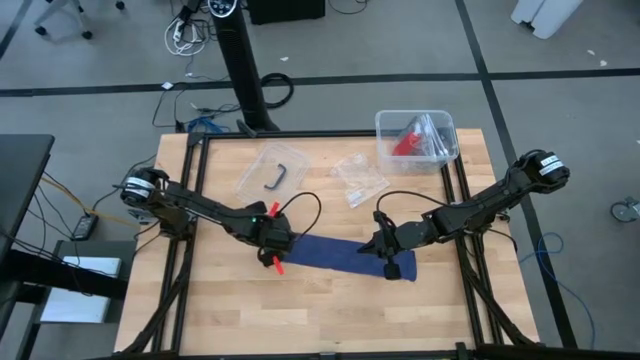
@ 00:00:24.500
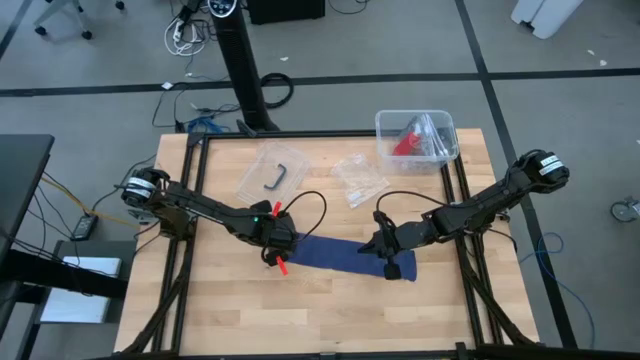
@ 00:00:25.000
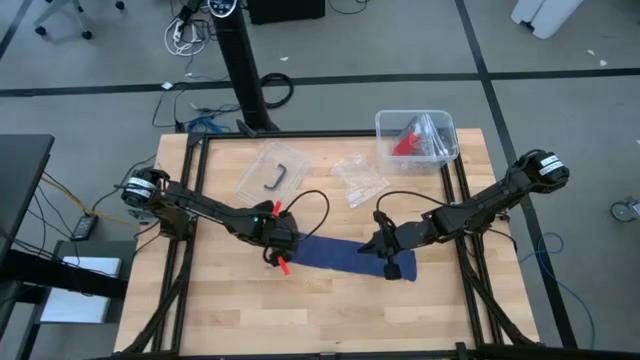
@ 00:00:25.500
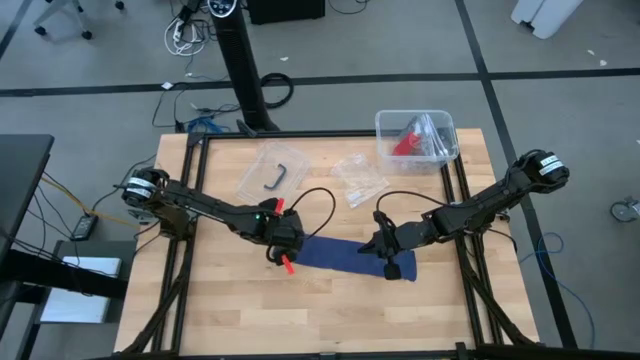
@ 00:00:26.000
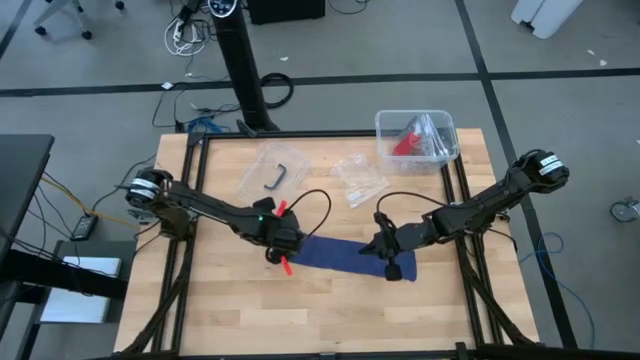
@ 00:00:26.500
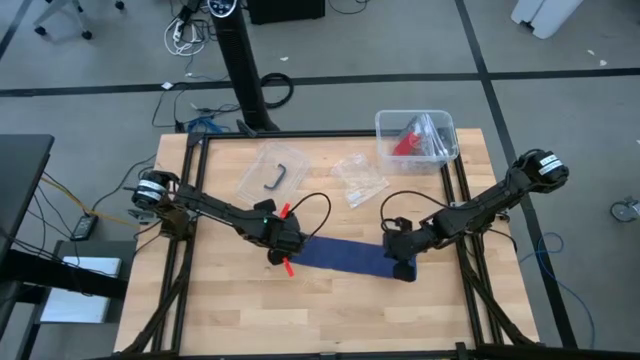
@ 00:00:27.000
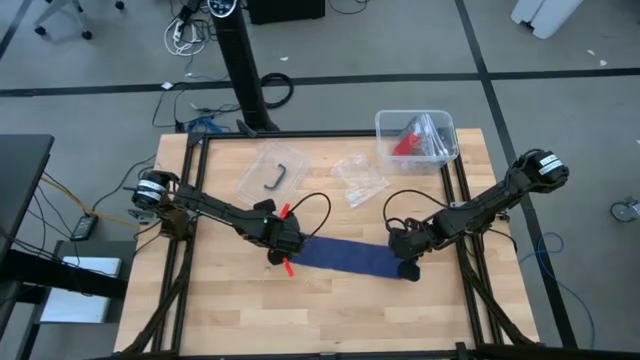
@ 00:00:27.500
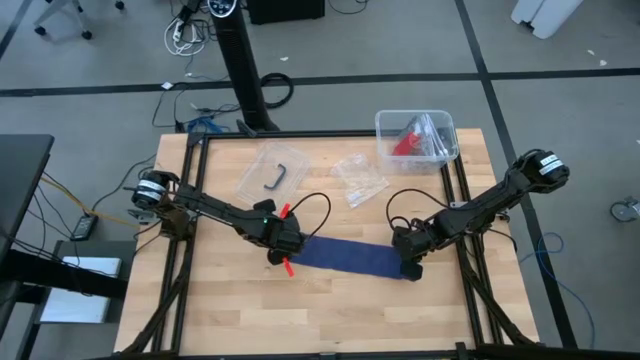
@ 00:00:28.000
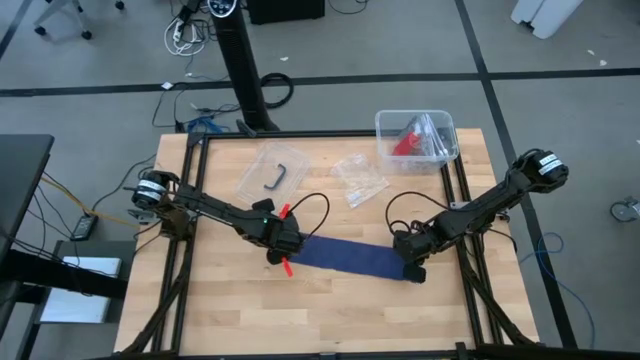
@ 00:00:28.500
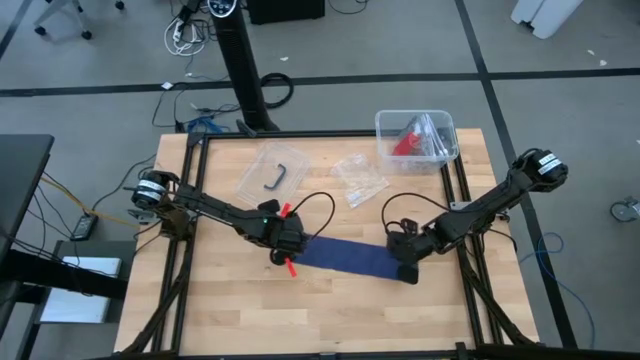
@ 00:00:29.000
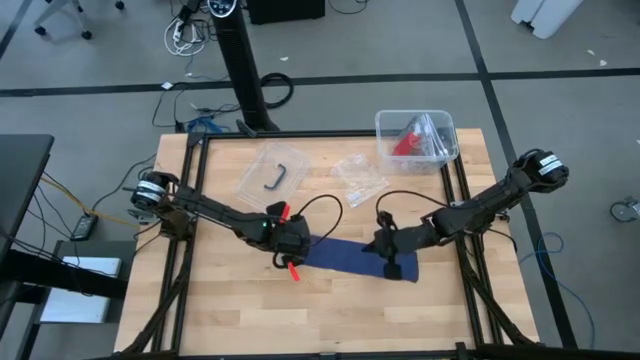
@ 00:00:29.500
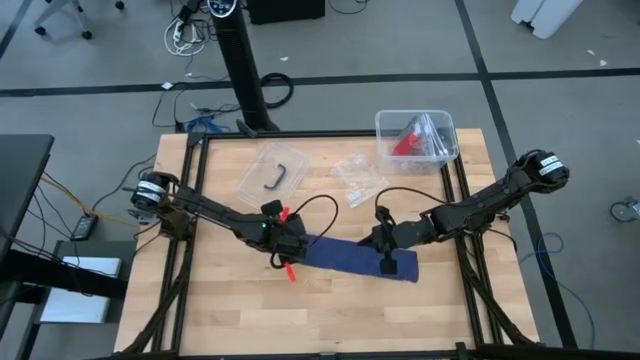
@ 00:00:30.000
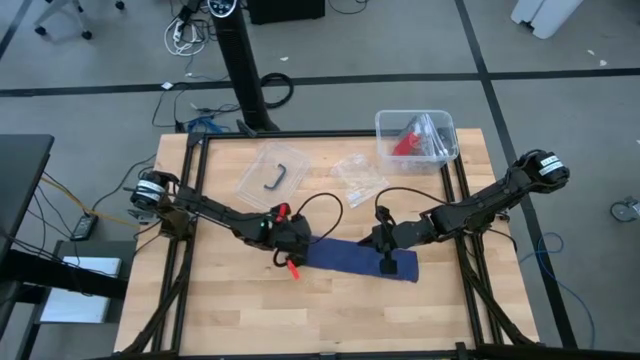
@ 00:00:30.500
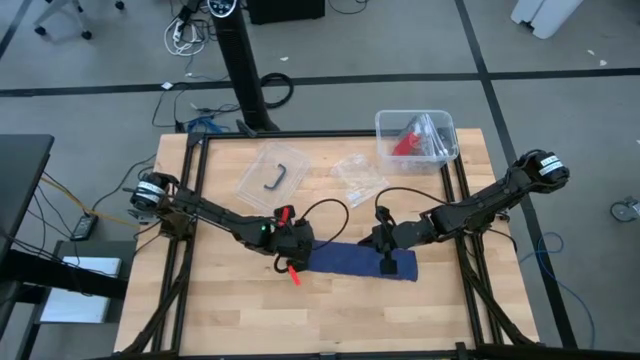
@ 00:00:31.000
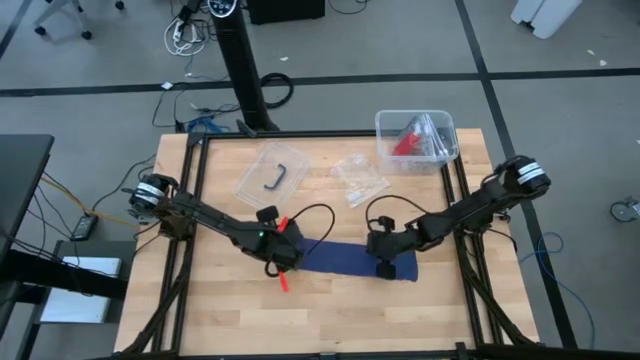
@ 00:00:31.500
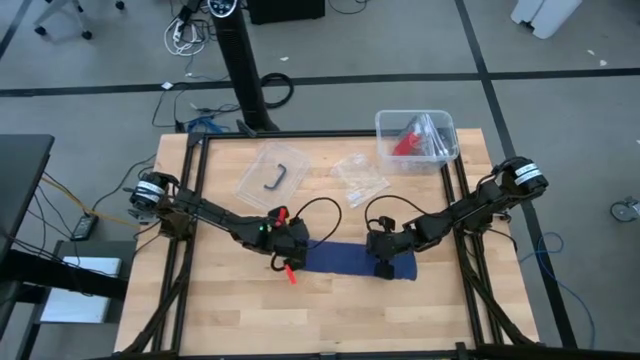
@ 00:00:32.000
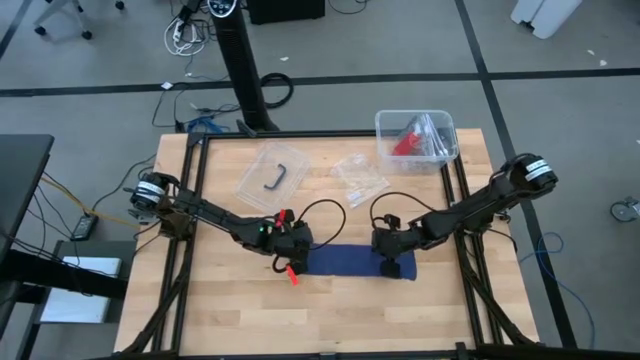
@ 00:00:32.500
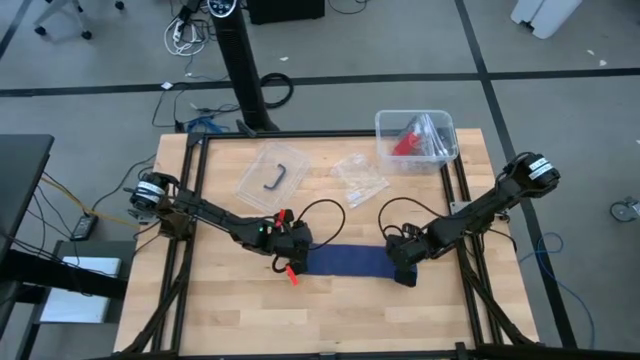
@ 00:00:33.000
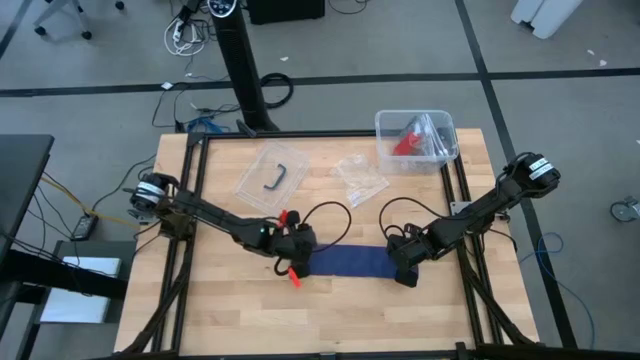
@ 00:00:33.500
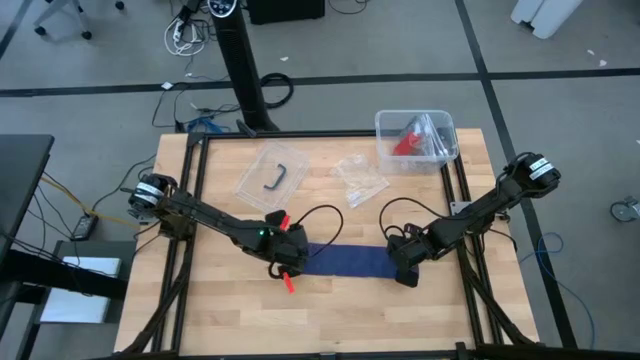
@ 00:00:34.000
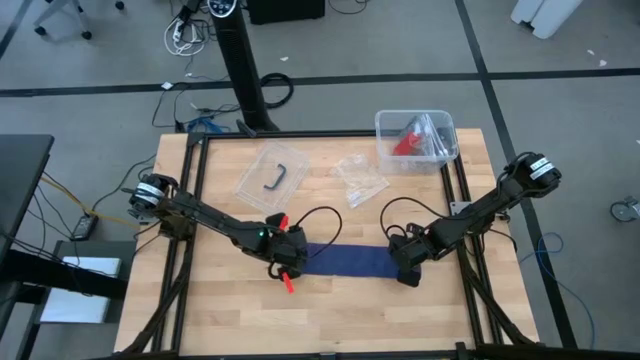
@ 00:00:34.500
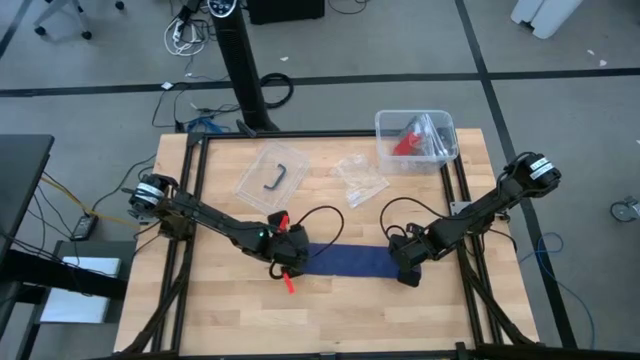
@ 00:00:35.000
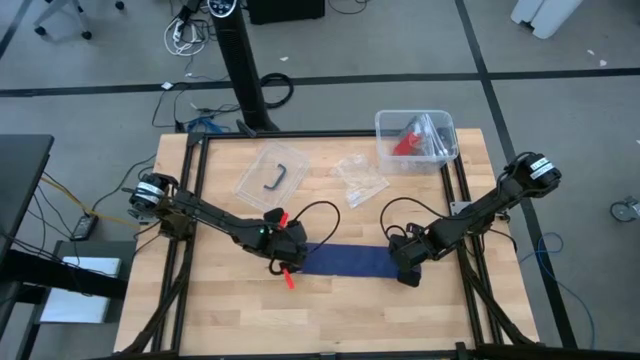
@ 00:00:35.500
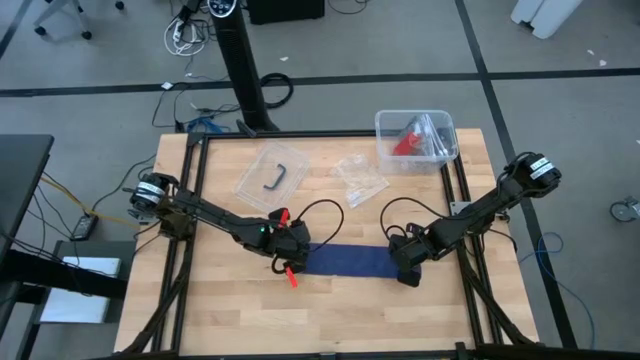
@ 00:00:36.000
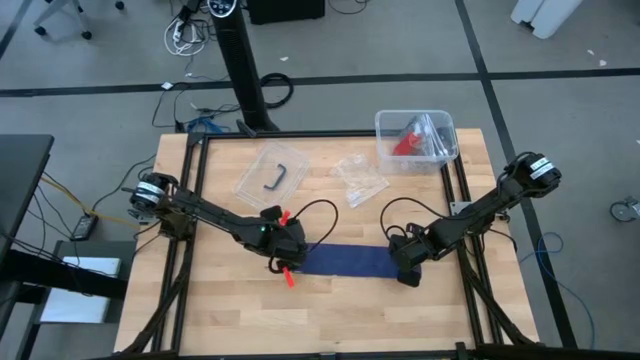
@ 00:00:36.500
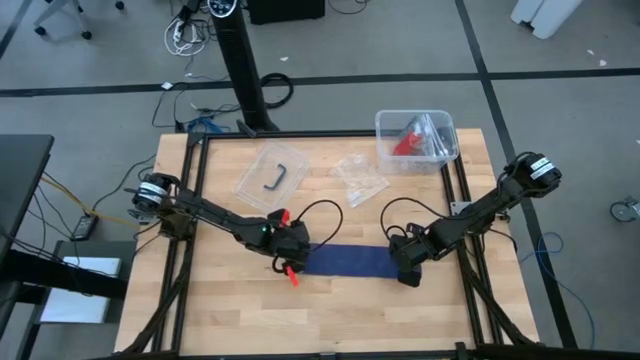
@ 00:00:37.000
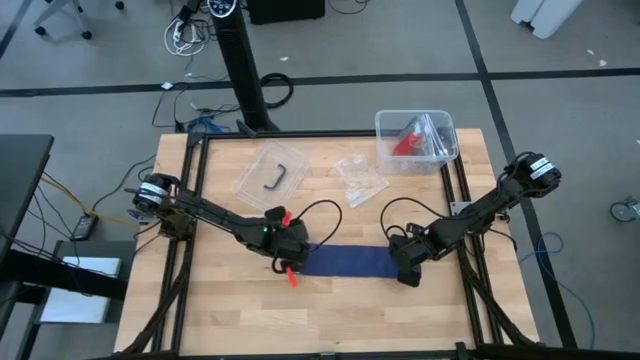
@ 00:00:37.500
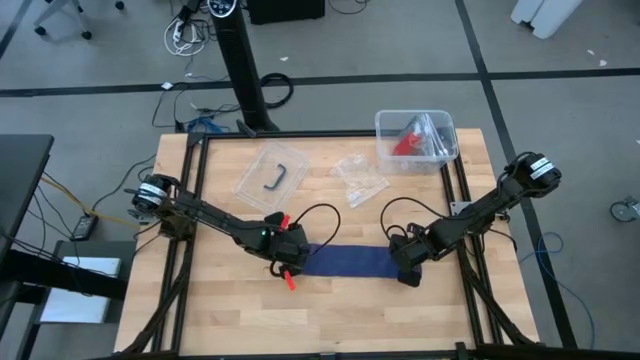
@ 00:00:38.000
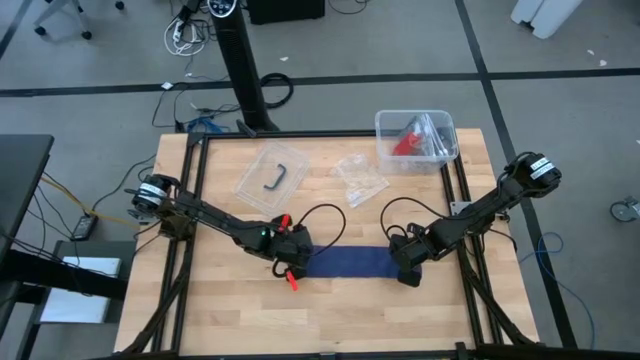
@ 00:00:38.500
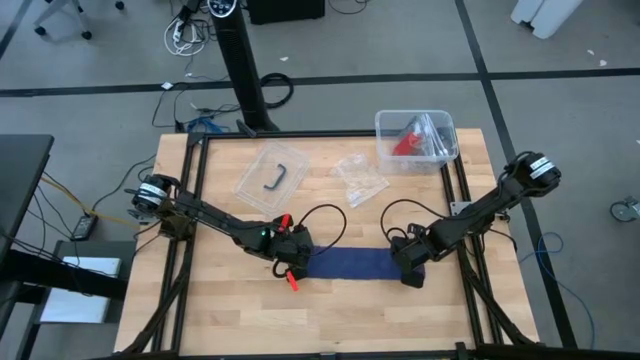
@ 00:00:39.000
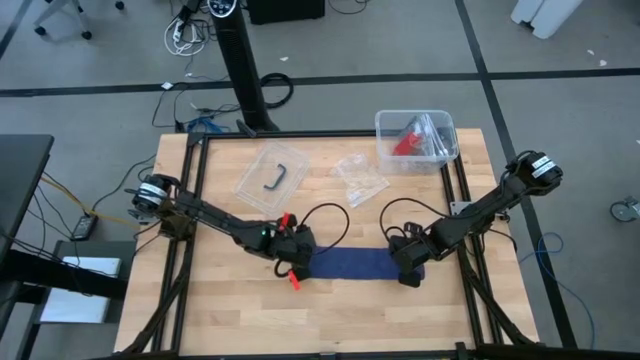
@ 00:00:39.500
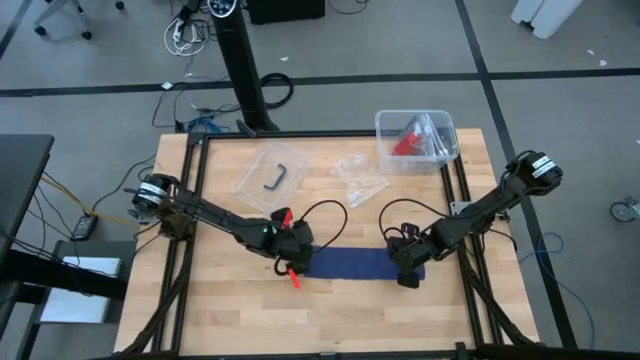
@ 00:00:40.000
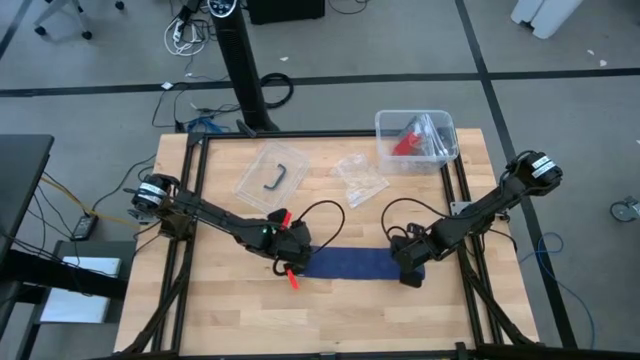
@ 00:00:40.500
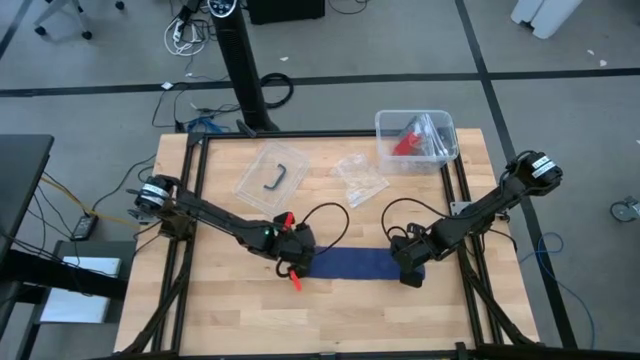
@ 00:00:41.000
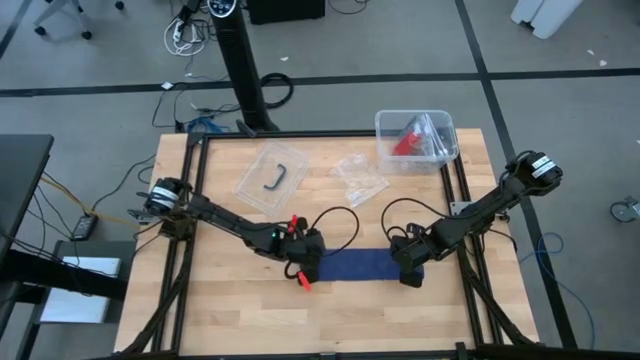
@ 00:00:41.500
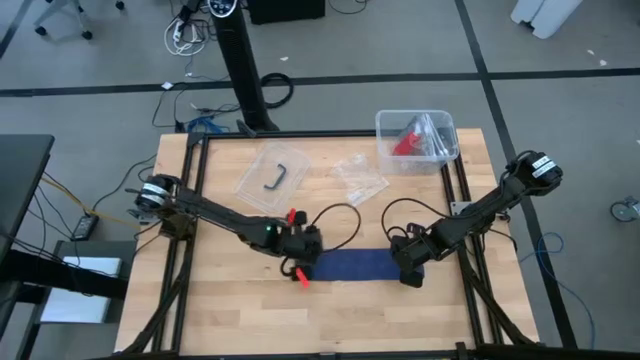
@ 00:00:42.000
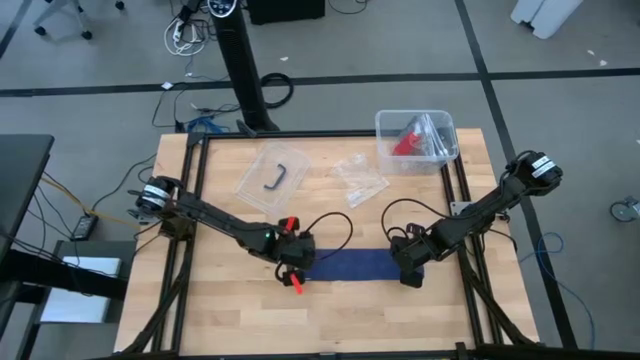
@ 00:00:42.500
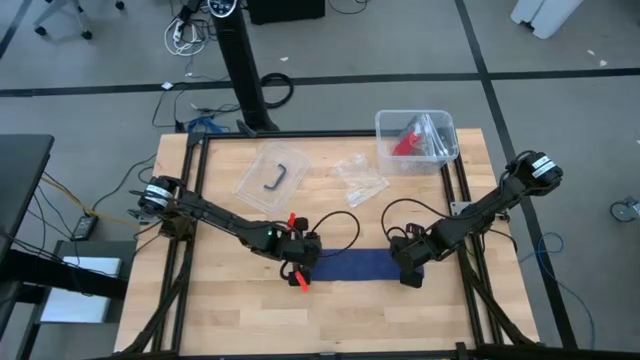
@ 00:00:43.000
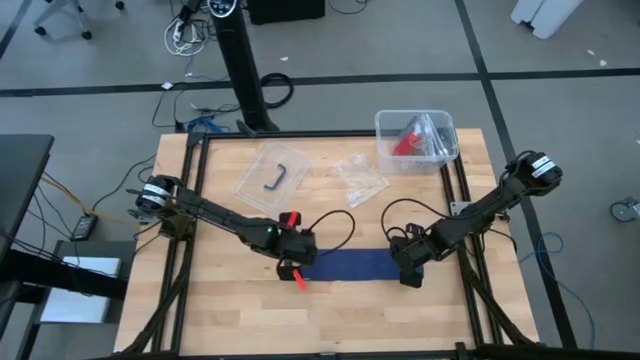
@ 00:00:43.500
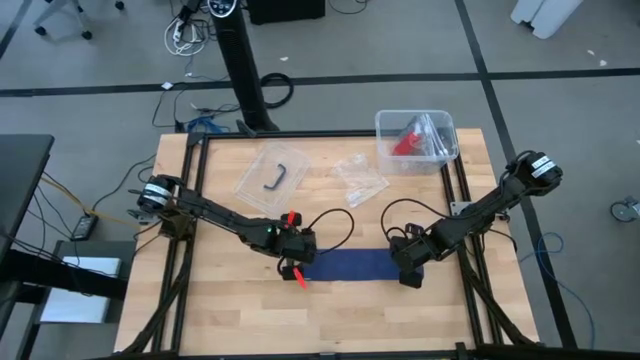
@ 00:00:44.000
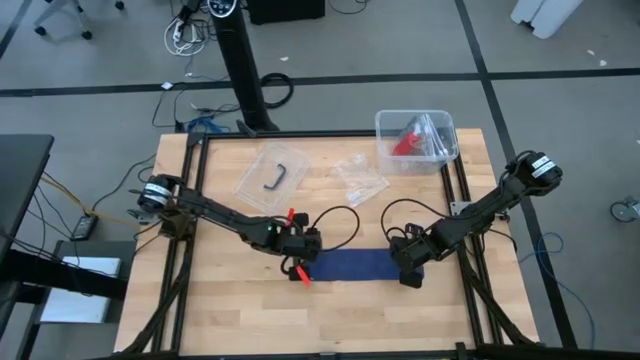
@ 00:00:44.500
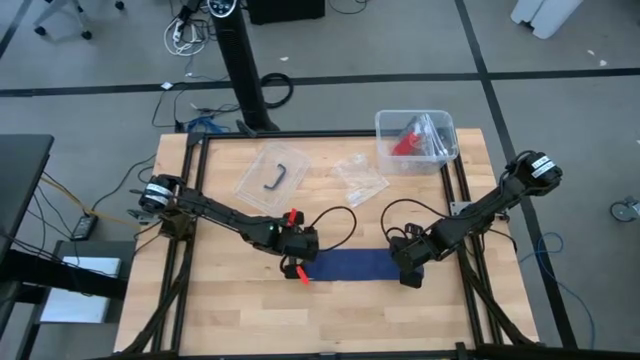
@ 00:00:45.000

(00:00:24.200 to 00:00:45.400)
Task: Roll bandage
Roll the blue bandage
